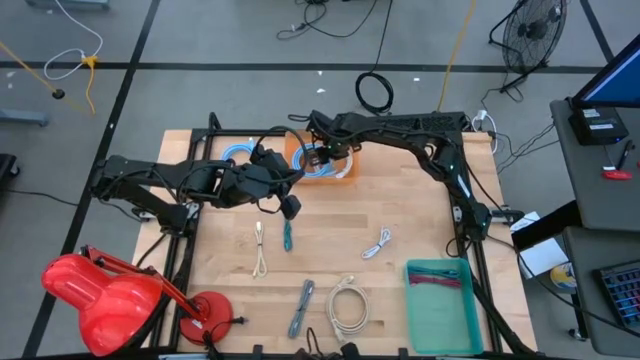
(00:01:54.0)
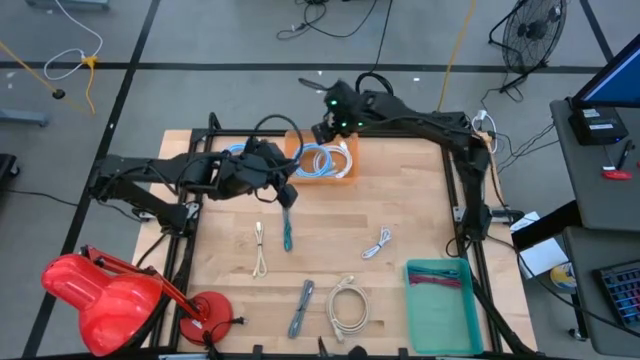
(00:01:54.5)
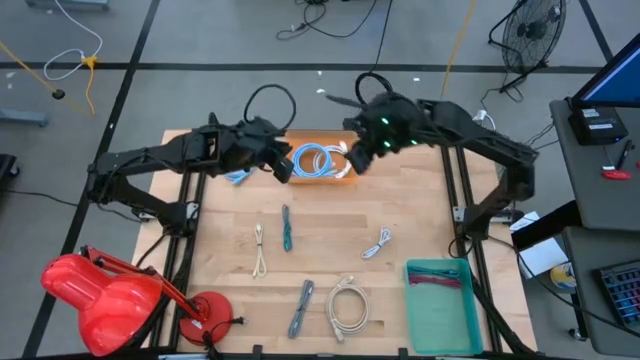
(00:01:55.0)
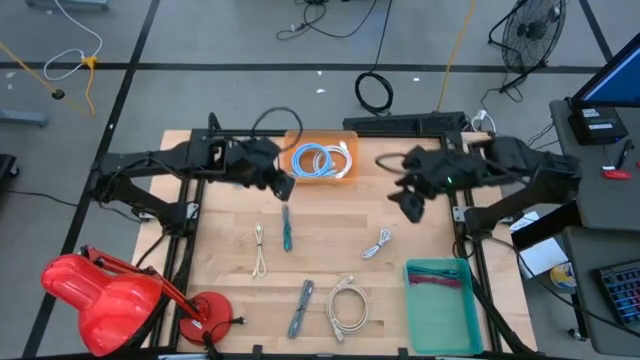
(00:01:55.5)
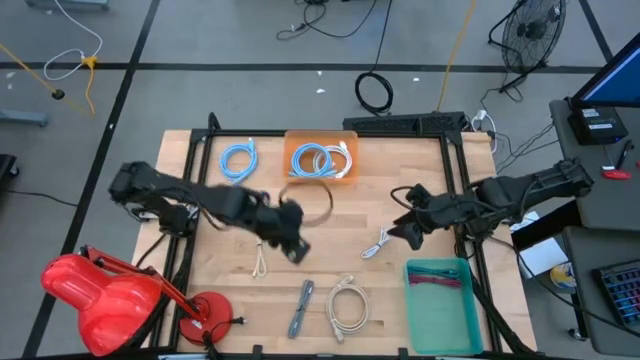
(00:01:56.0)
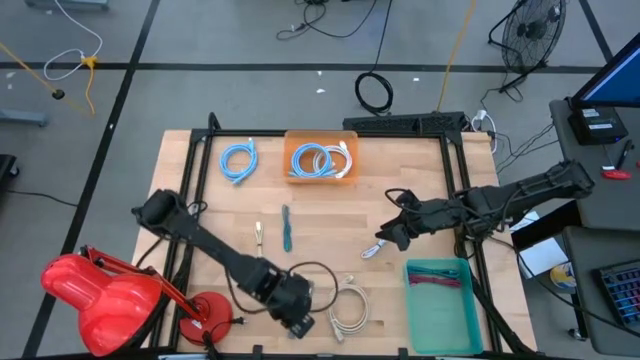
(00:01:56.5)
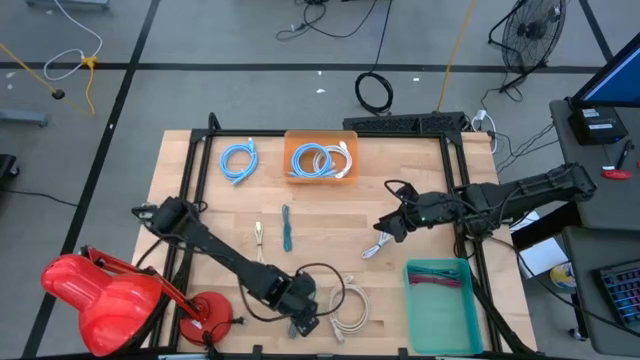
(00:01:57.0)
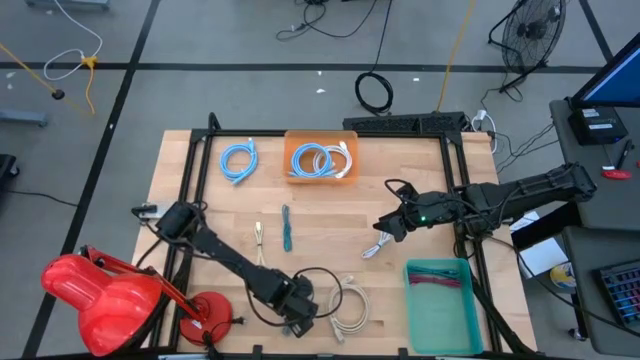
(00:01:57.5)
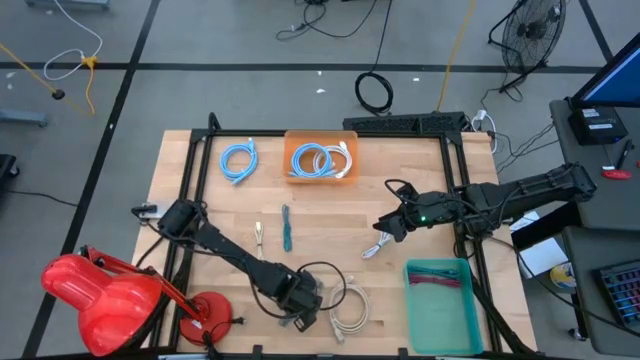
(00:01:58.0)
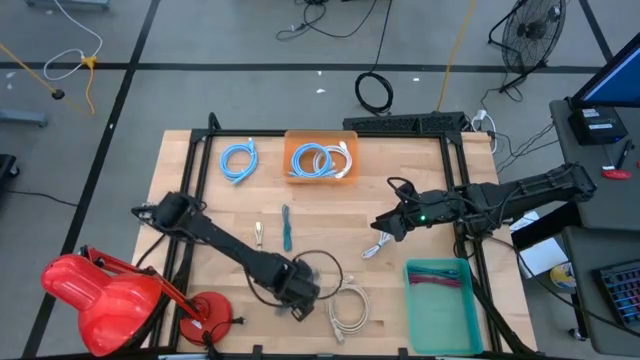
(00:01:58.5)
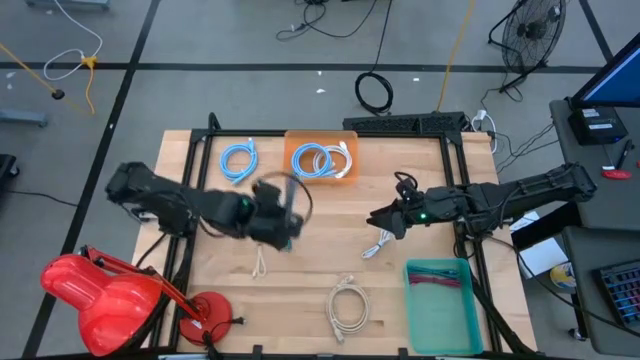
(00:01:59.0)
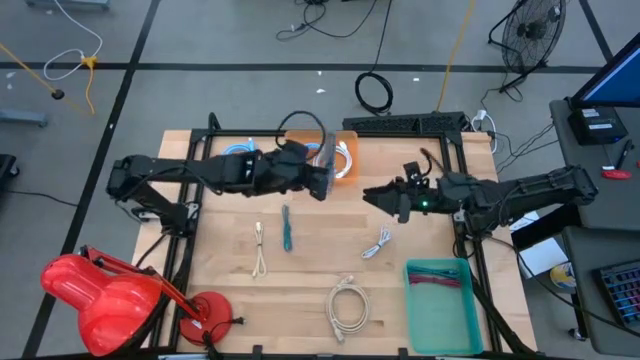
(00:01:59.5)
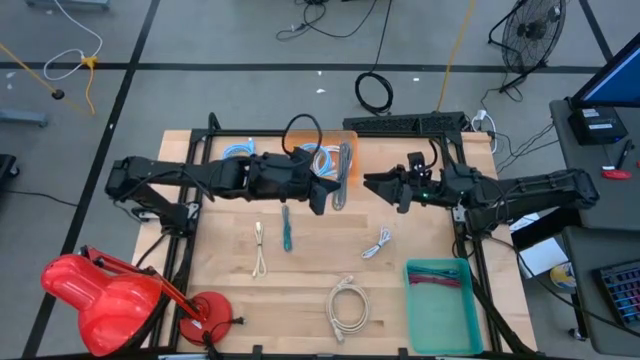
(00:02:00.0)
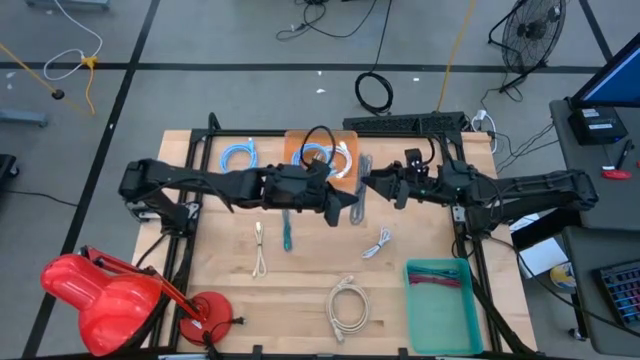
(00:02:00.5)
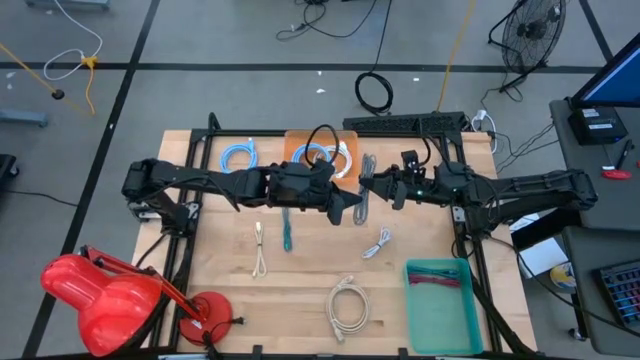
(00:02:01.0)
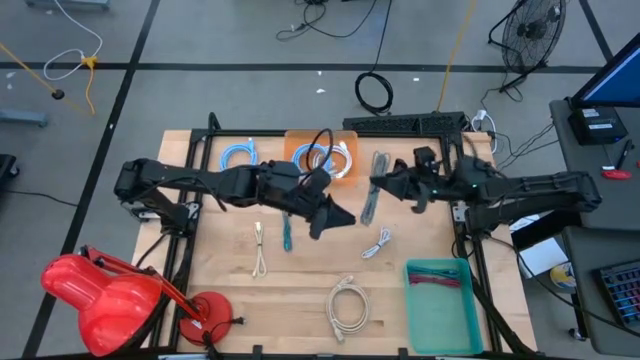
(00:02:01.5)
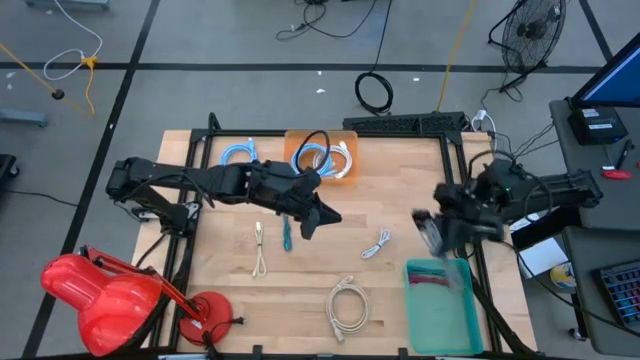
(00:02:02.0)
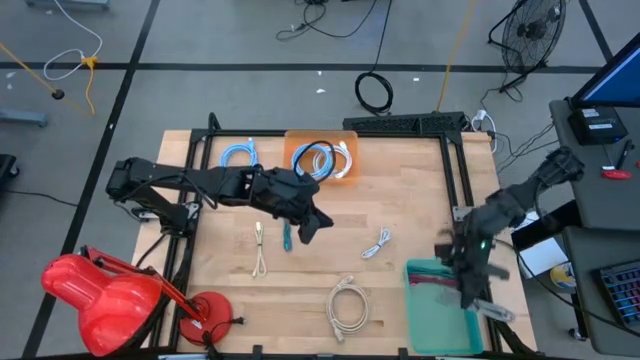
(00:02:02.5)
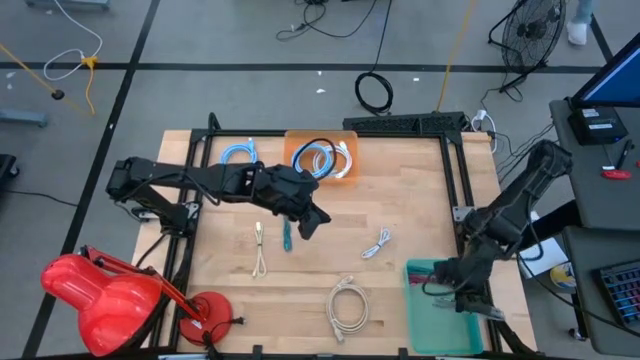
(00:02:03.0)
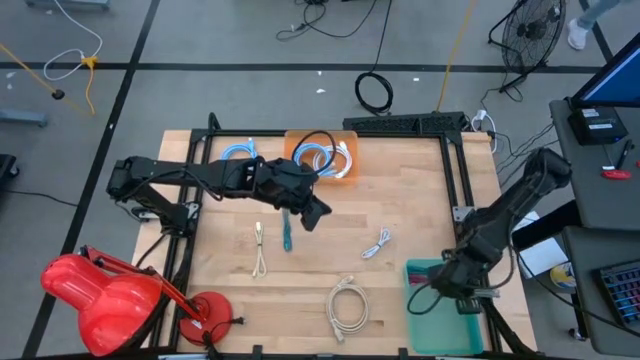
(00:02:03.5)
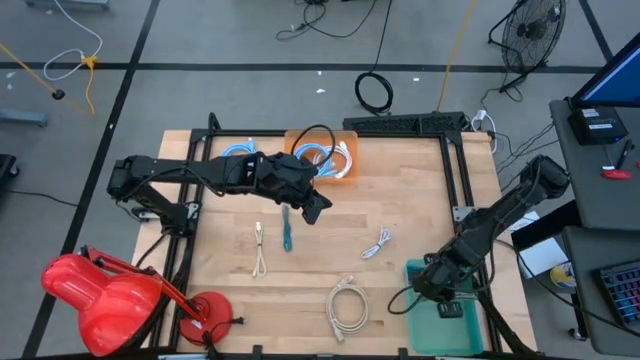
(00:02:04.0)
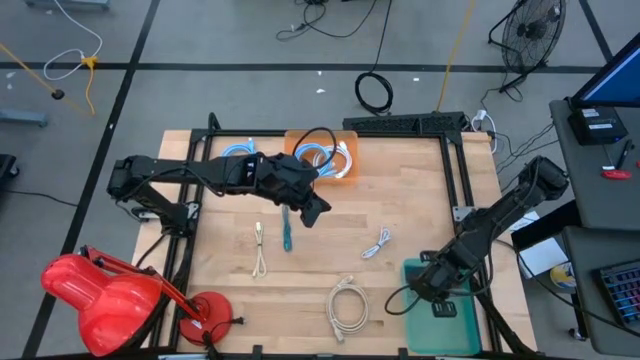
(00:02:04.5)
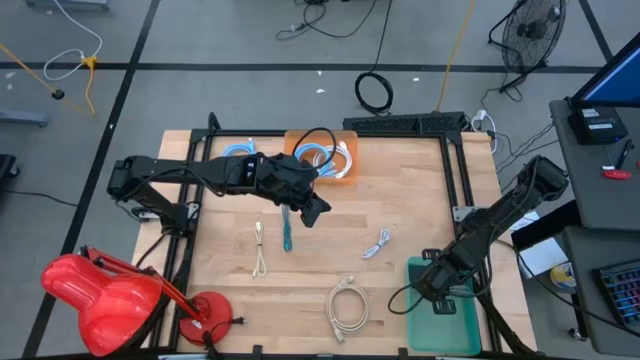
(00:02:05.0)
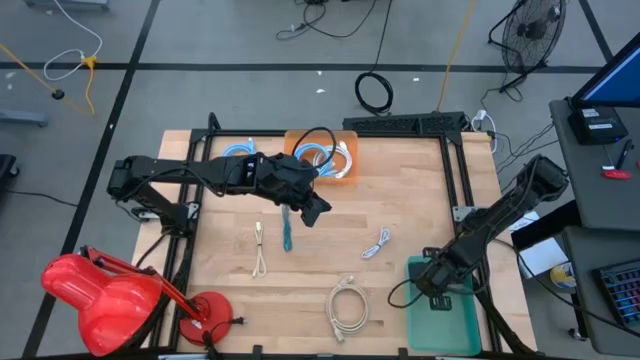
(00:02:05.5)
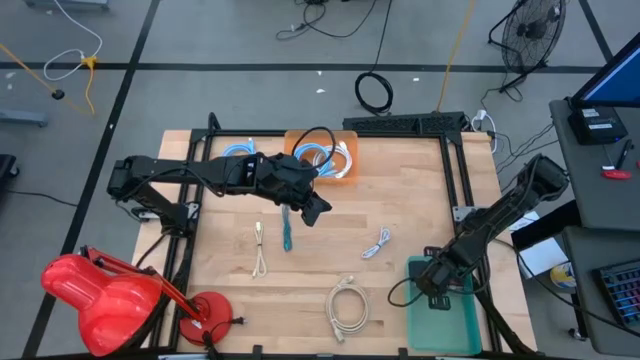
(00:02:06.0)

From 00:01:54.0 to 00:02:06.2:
Task: Pick & Place USB Port
Put the small black charger cable into the green bin
